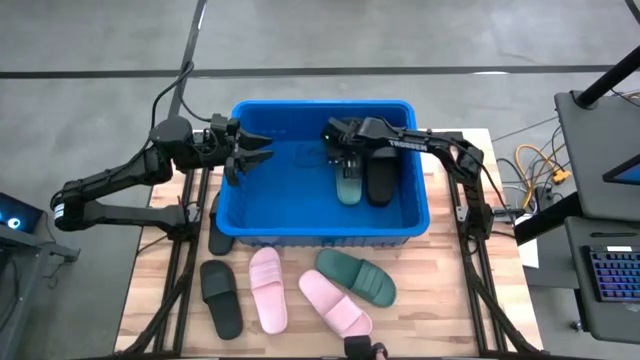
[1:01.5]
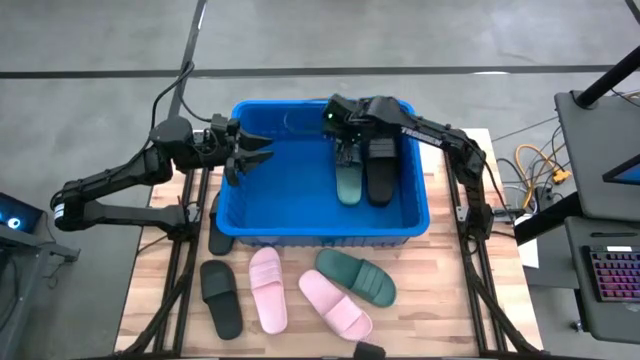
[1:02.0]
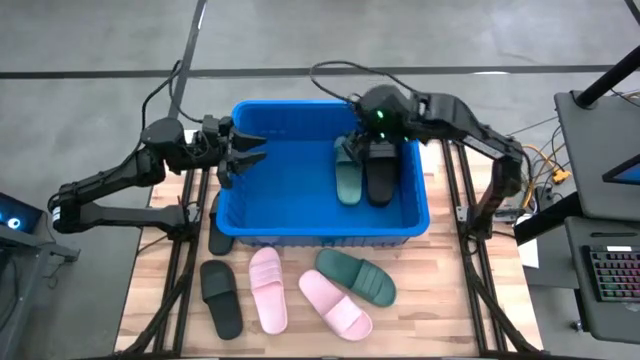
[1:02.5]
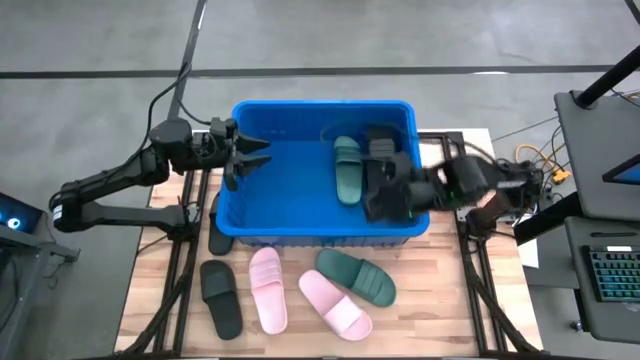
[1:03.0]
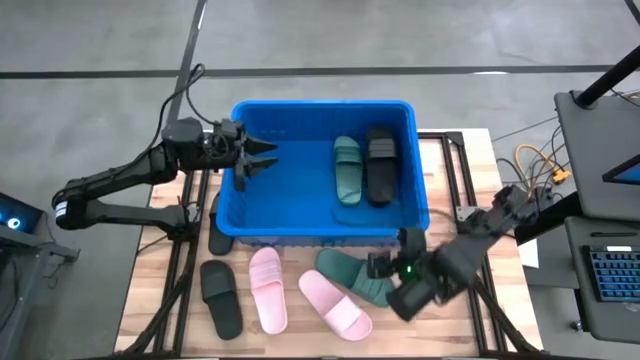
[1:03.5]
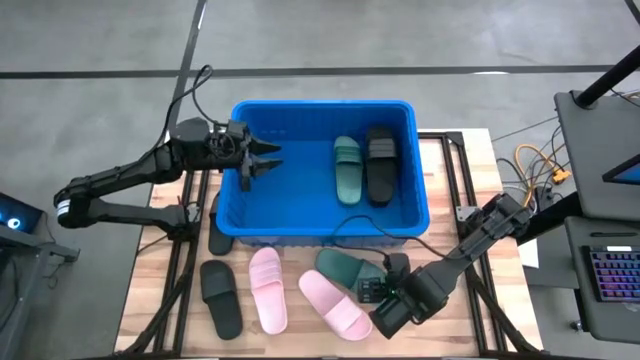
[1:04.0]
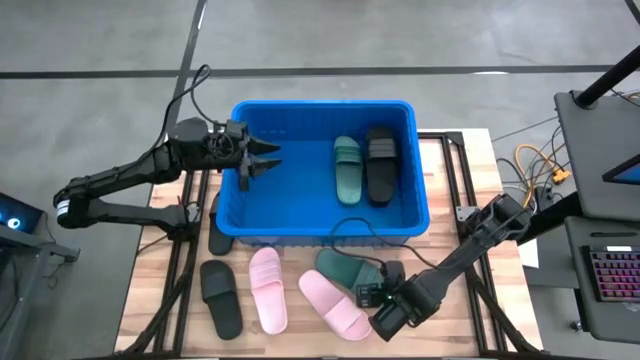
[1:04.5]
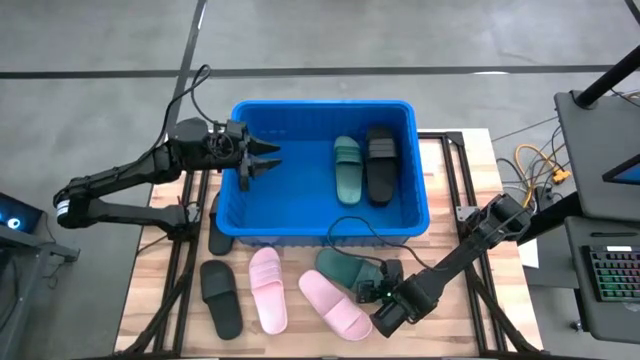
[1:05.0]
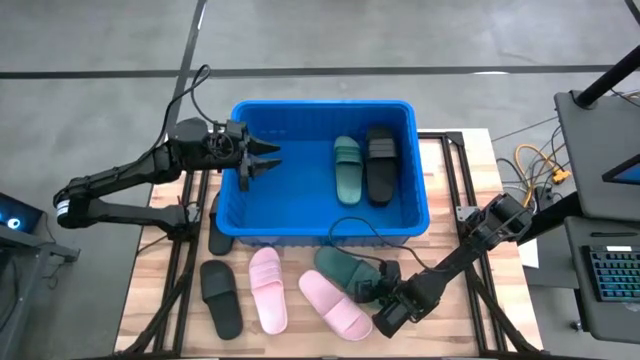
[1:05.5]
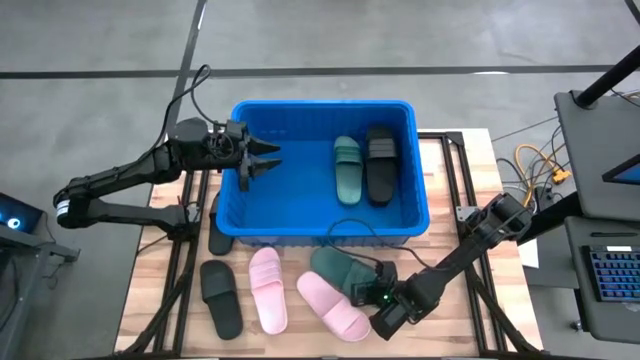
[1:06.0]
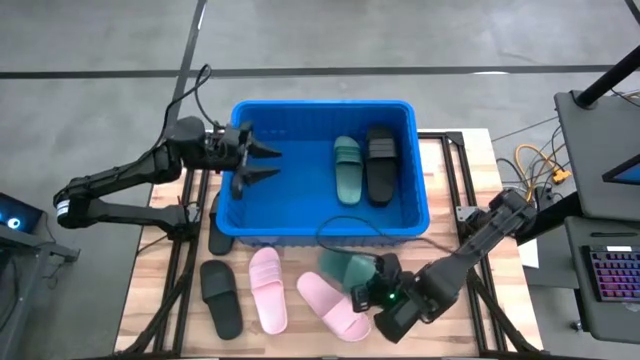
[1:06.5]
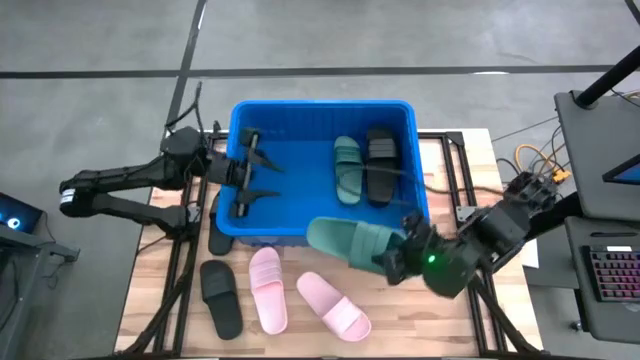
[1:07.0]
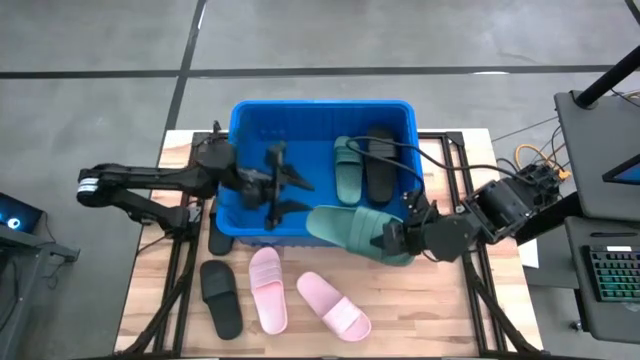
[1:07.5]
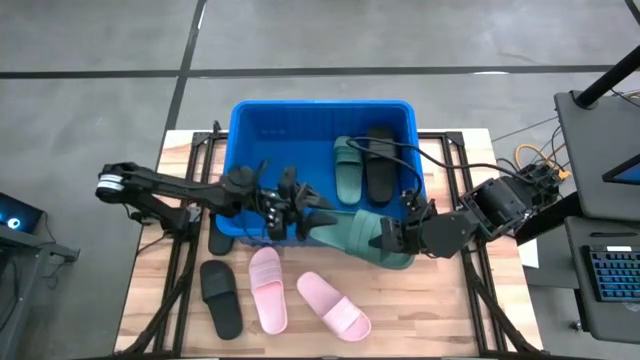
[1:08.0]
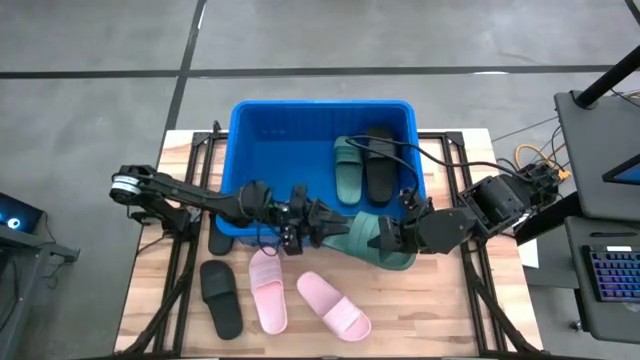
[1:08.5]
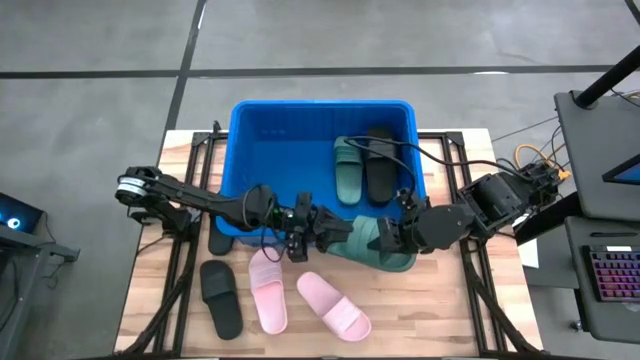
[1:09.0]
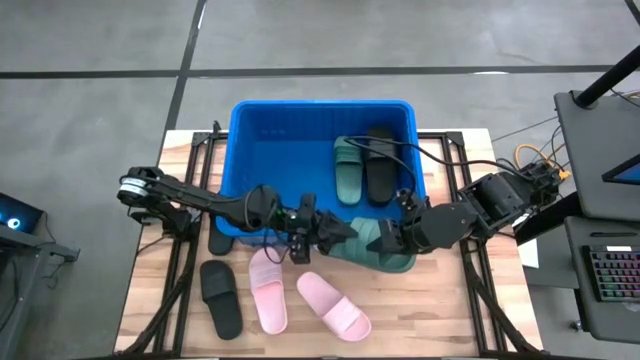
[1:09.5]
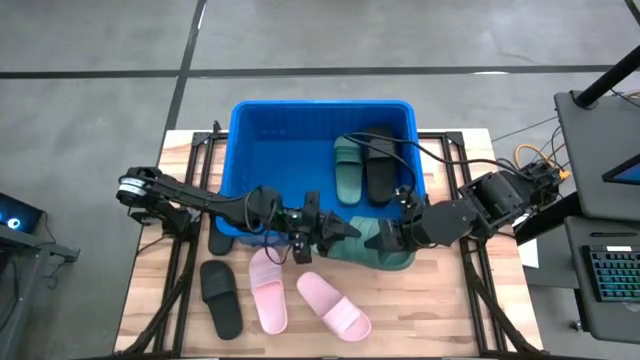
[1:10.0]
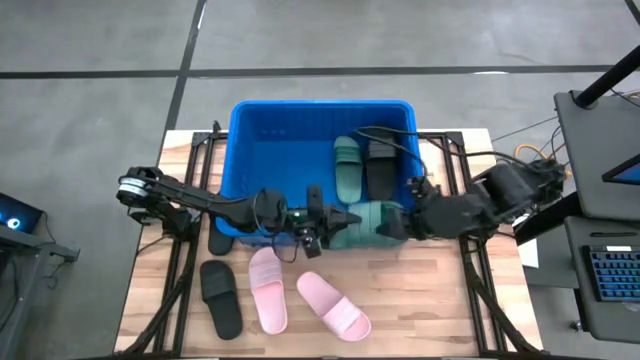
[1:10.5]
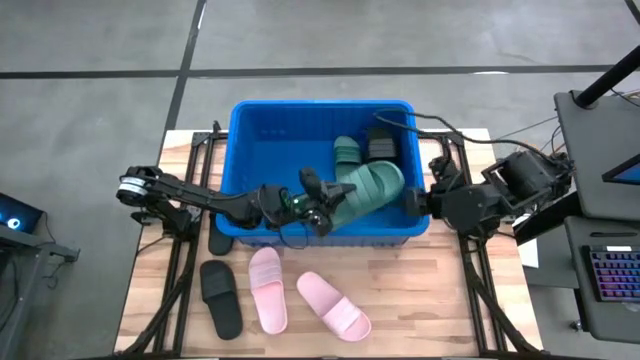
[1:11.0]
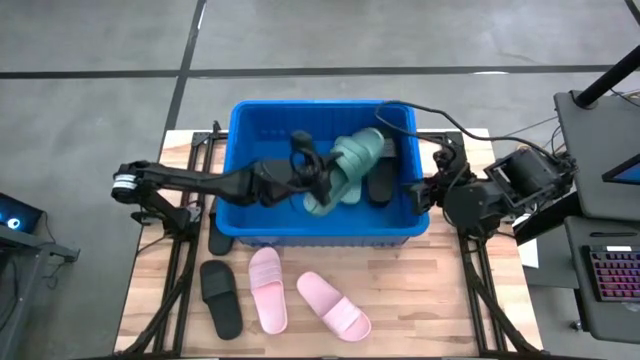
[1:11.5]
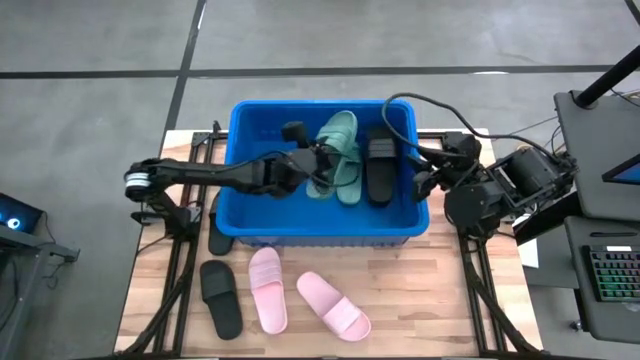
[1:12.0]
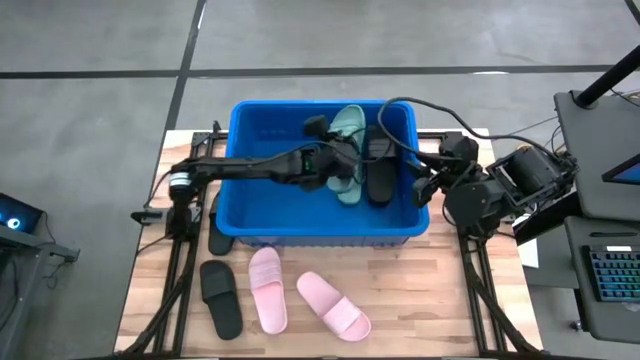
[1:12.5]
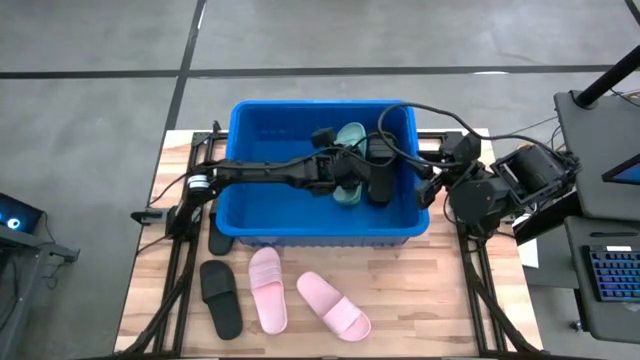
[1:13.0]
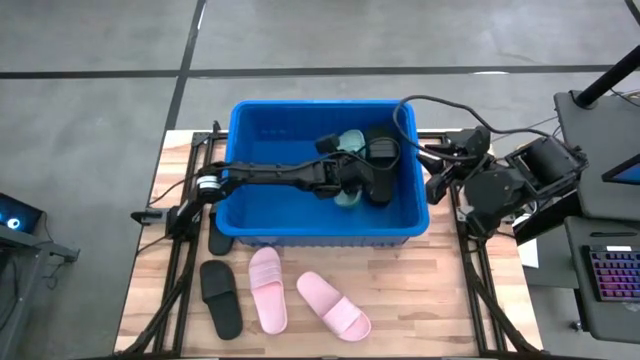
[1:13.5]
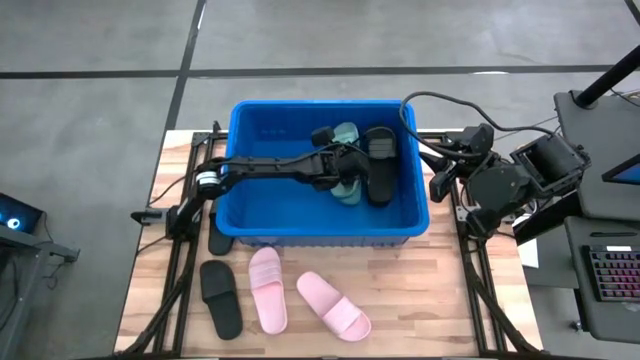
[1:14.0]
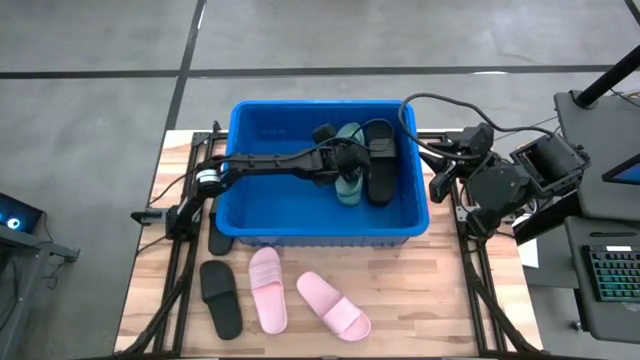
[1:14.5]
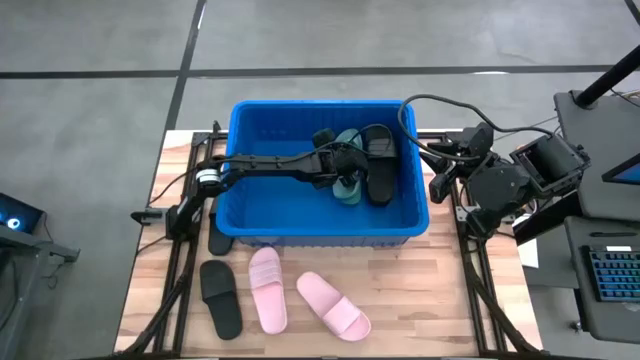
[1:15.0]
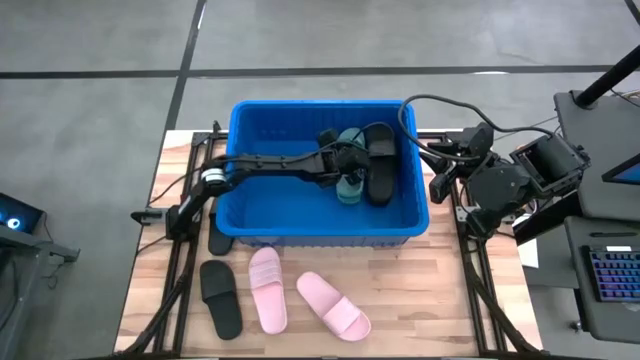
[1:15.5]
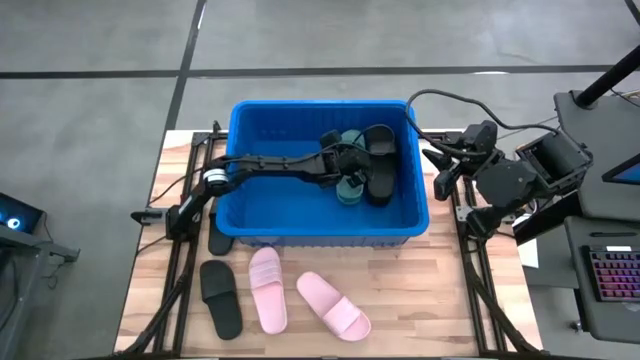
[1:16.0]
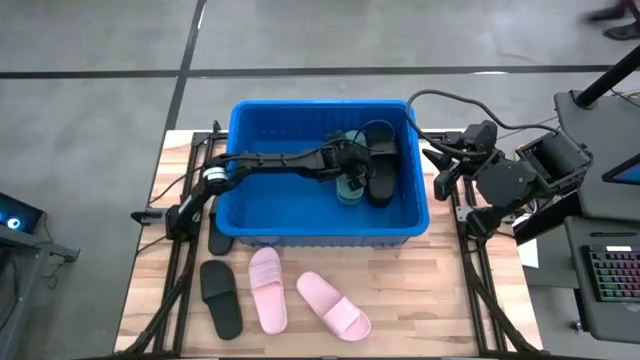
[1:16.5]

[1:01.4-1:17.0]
Task: Pick and place slides into bin
Put the green slide into the blue bin

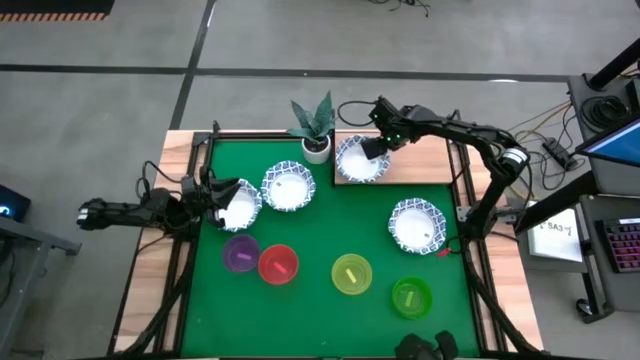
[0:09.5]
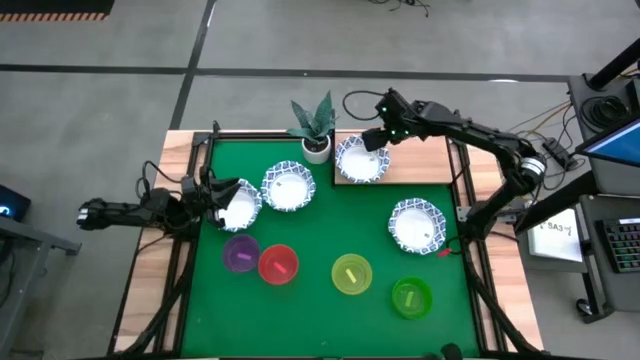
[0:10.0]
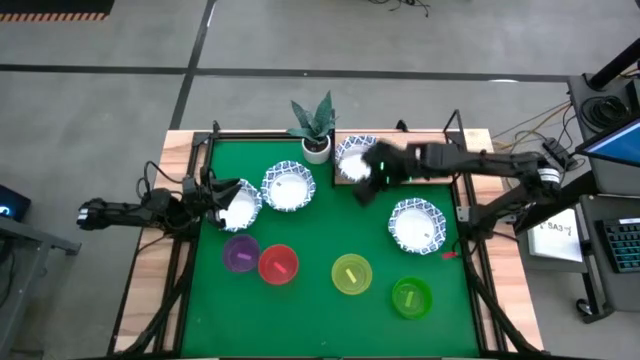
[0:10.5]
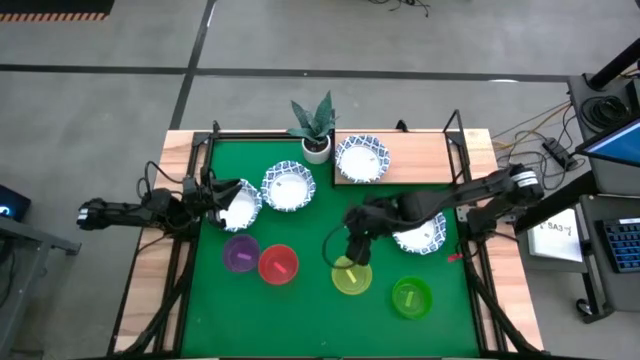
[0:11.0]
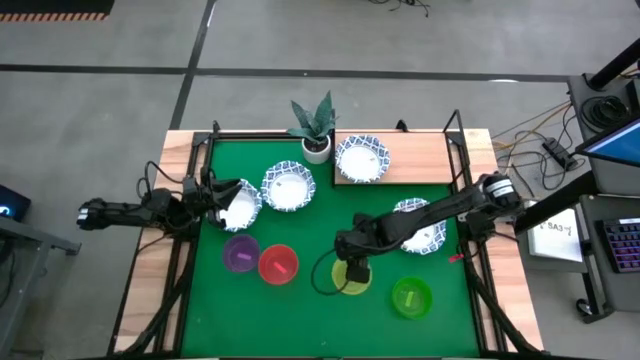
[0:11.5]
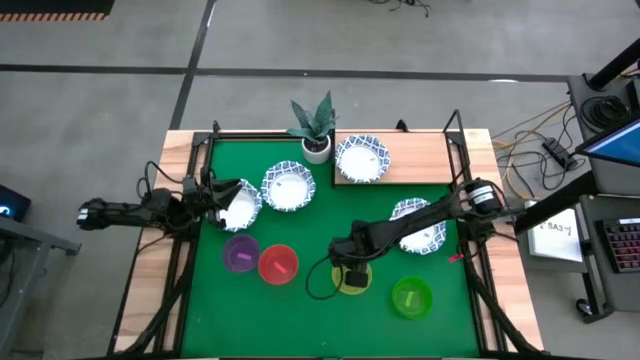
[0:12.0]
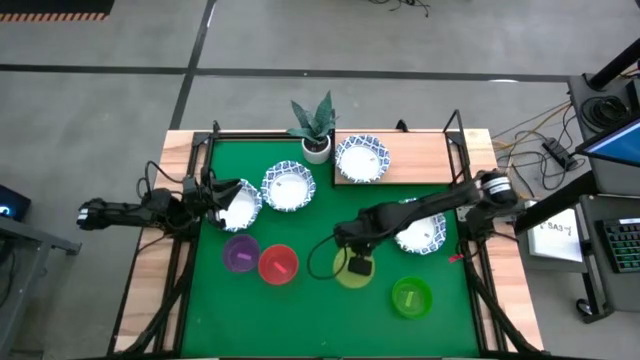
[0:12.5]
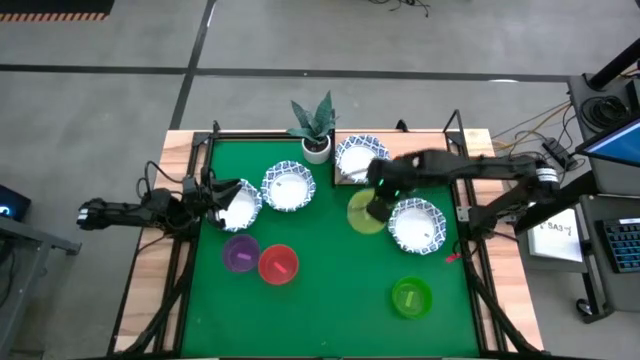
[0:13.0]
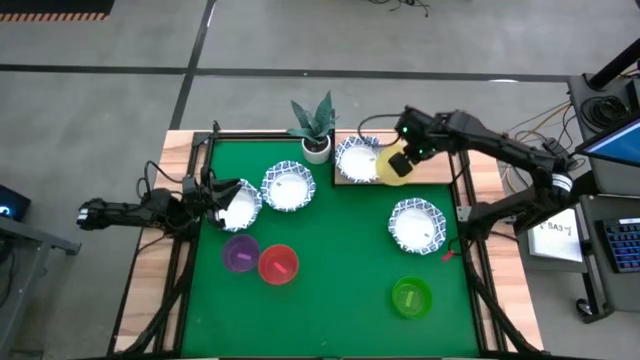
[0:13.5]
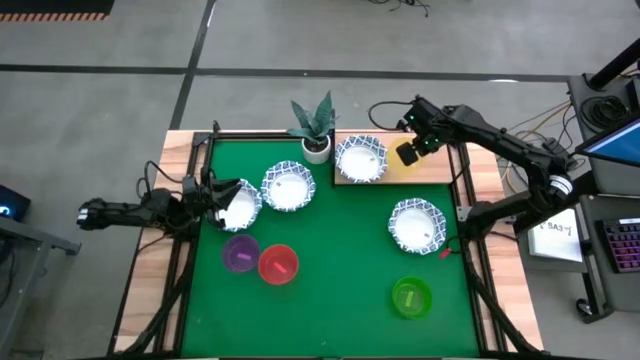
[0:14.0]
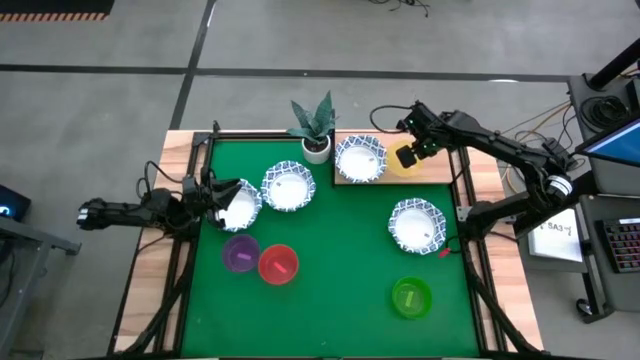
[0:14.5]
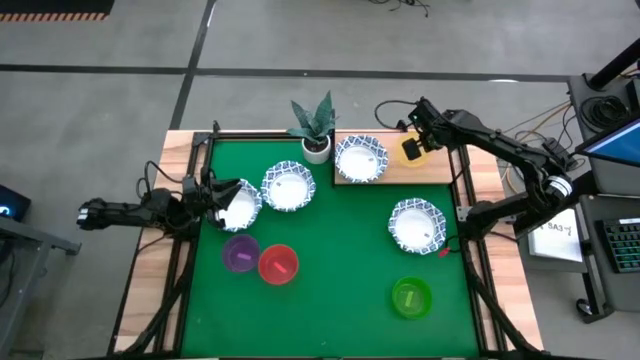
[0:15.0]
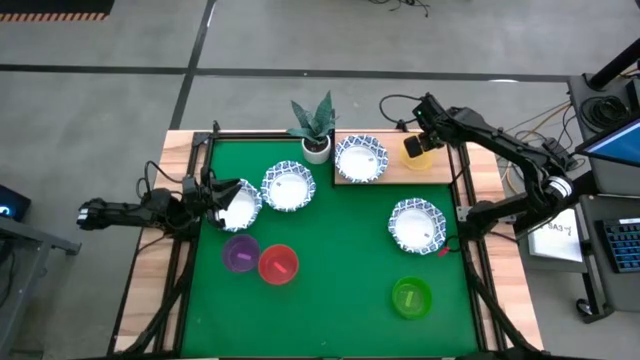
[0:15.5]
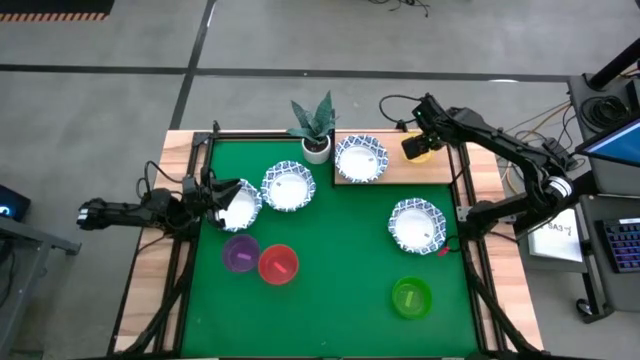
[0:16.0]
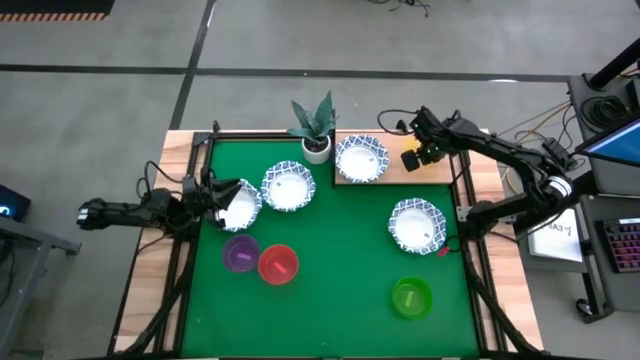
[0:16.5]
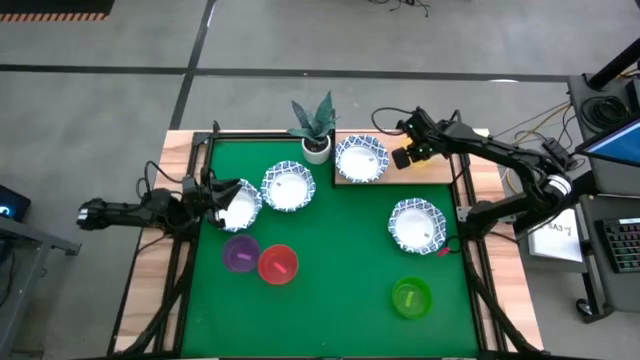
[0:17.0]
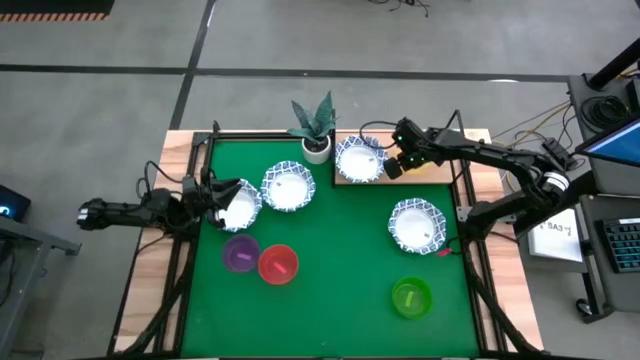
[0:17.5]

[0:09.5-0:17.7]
Task: Place and stack bowls onto a shelf
Put the yellow bowl on the shelf
